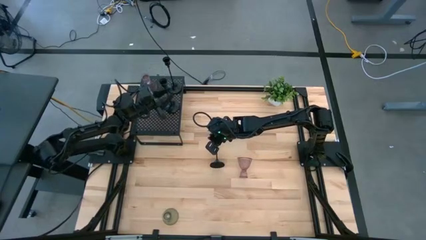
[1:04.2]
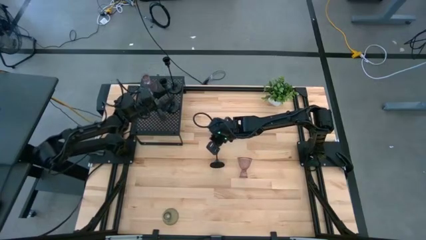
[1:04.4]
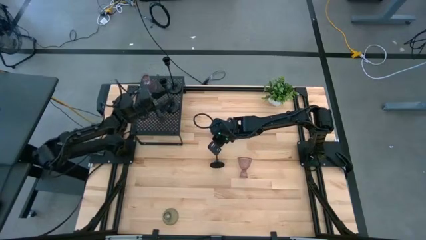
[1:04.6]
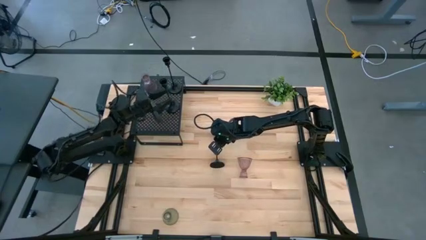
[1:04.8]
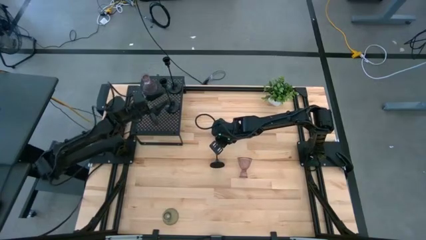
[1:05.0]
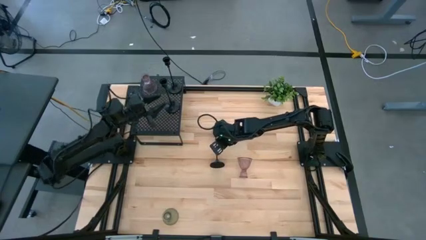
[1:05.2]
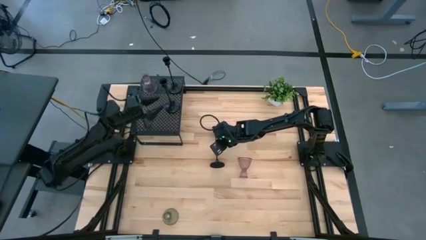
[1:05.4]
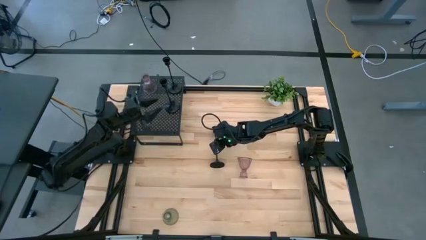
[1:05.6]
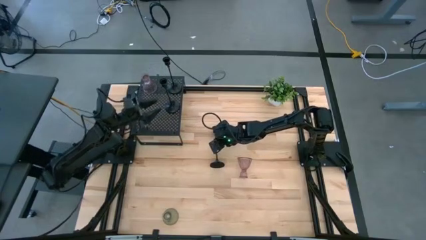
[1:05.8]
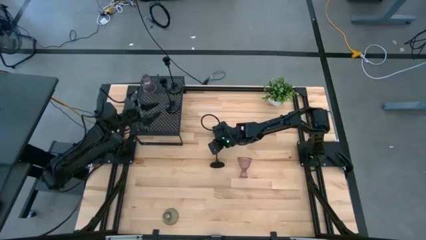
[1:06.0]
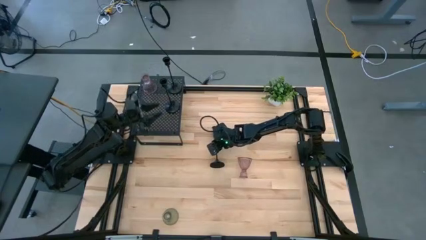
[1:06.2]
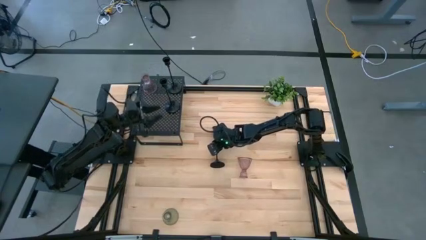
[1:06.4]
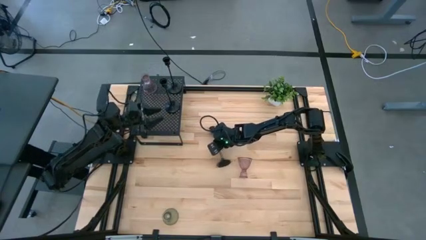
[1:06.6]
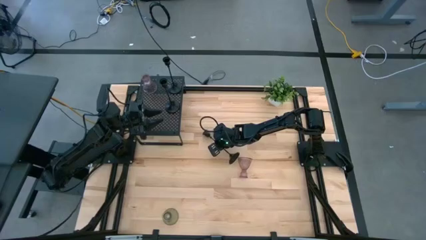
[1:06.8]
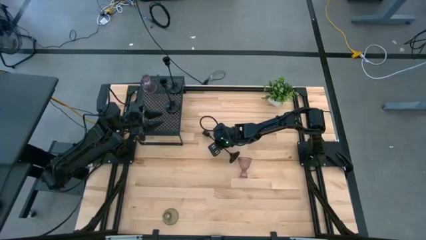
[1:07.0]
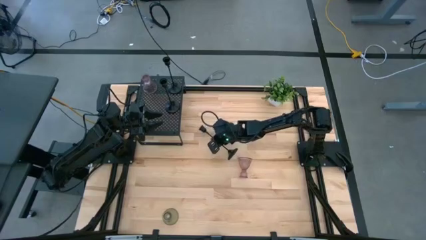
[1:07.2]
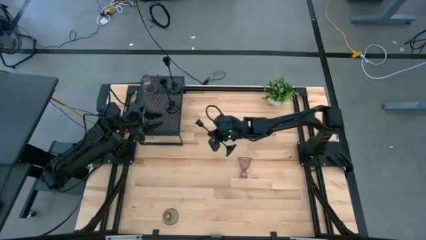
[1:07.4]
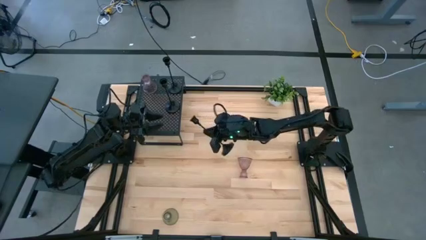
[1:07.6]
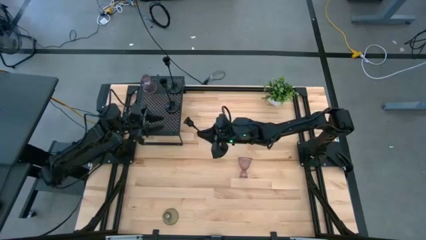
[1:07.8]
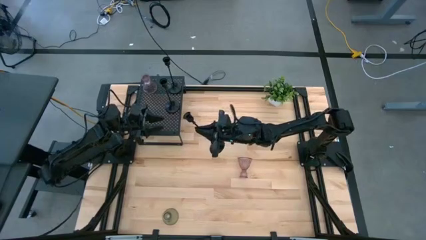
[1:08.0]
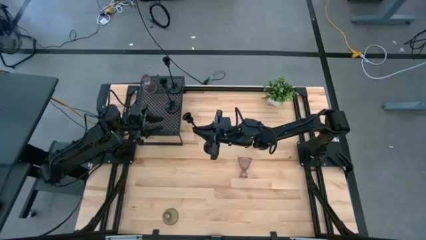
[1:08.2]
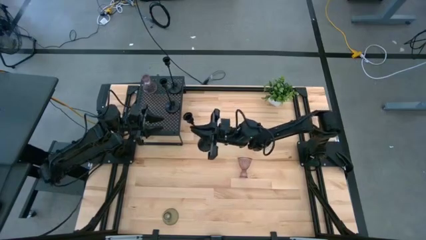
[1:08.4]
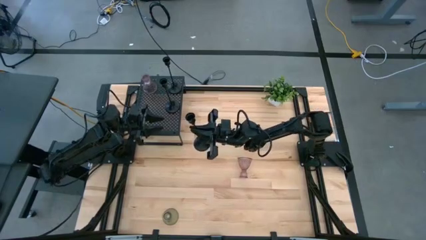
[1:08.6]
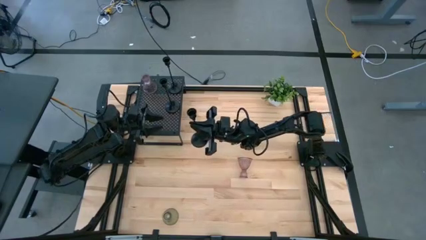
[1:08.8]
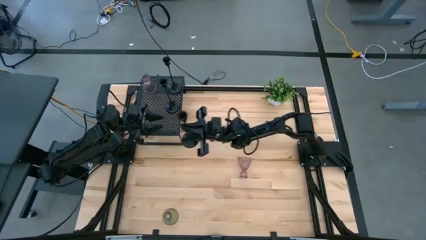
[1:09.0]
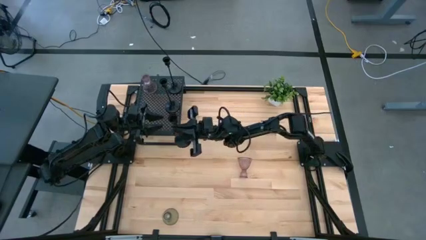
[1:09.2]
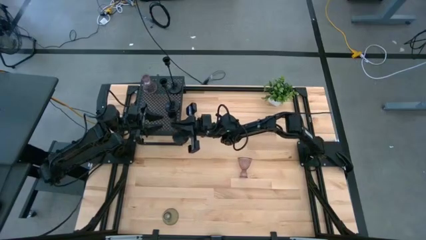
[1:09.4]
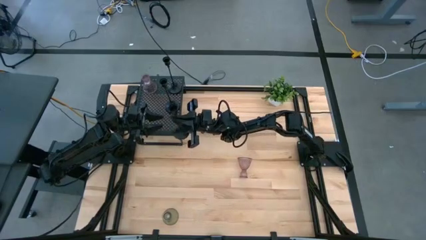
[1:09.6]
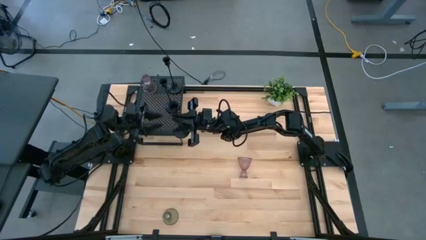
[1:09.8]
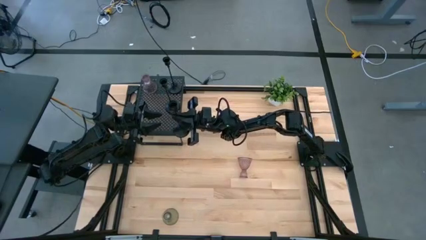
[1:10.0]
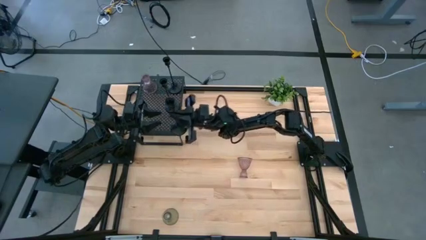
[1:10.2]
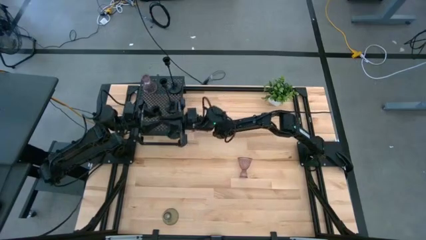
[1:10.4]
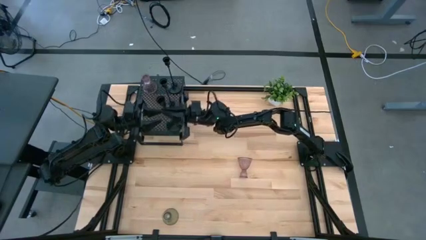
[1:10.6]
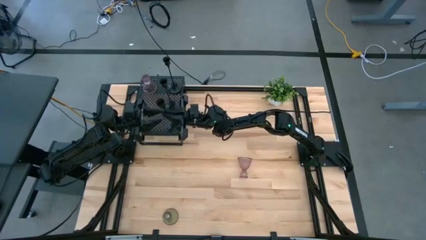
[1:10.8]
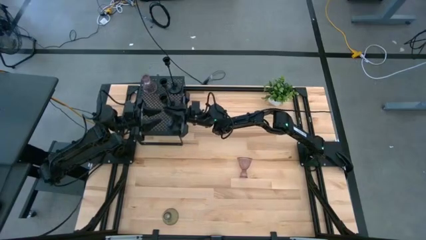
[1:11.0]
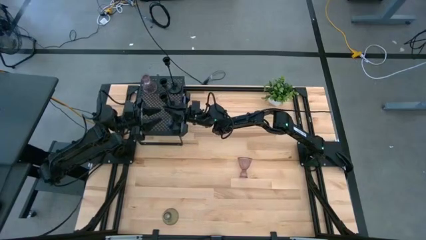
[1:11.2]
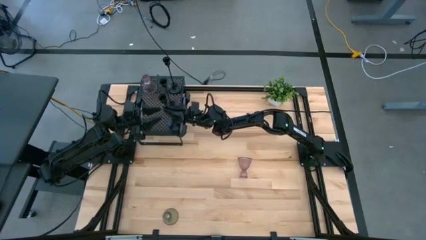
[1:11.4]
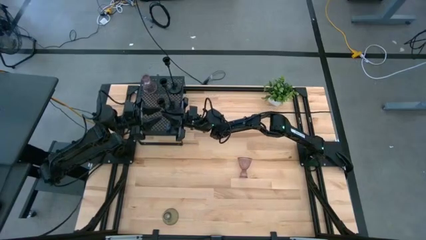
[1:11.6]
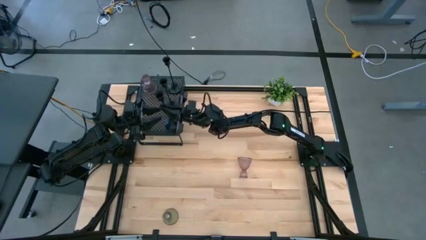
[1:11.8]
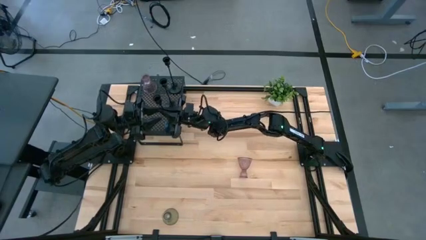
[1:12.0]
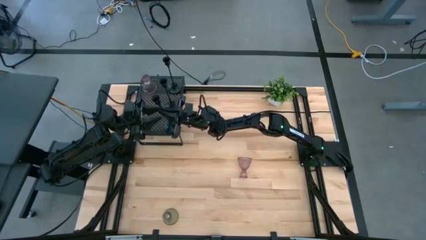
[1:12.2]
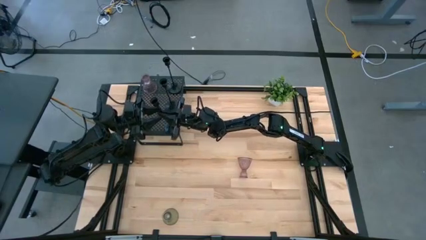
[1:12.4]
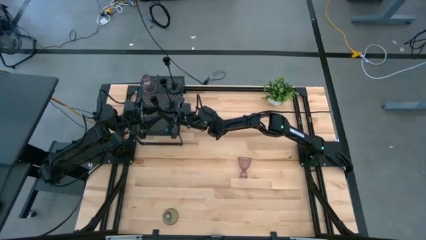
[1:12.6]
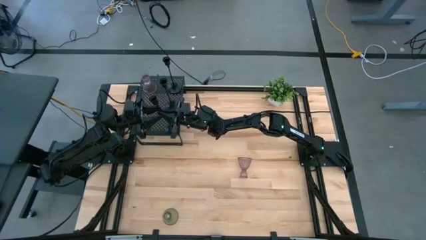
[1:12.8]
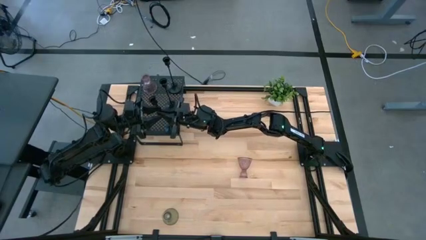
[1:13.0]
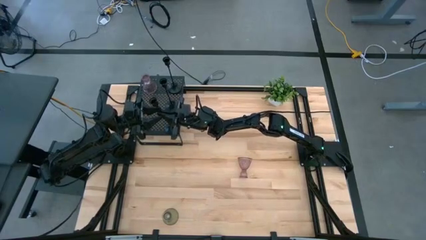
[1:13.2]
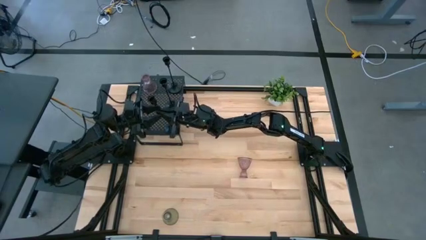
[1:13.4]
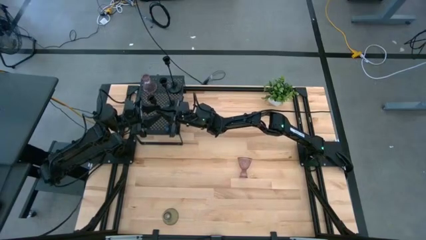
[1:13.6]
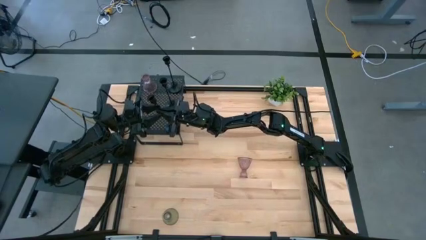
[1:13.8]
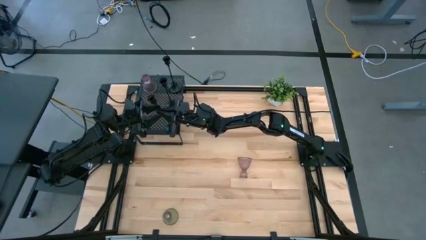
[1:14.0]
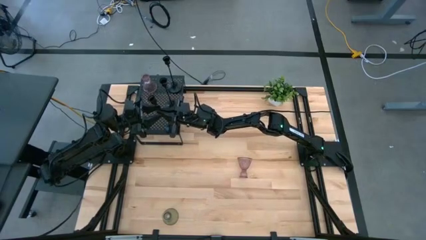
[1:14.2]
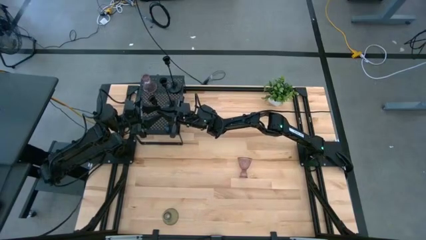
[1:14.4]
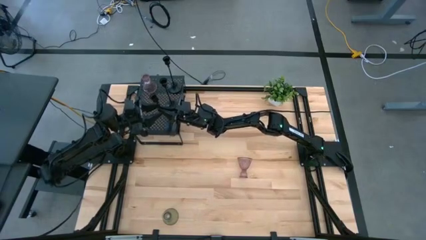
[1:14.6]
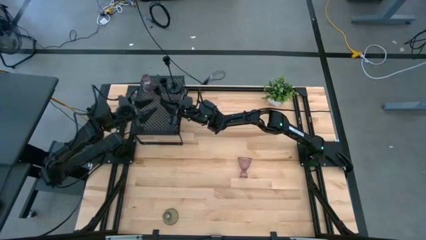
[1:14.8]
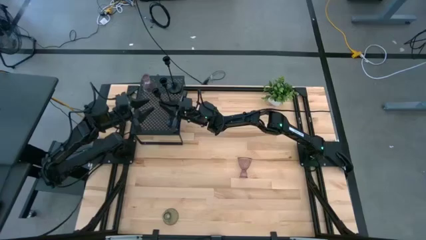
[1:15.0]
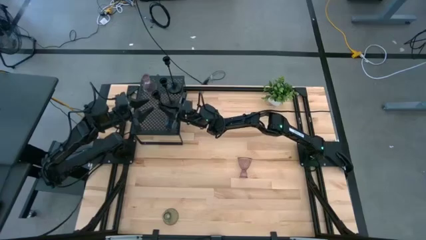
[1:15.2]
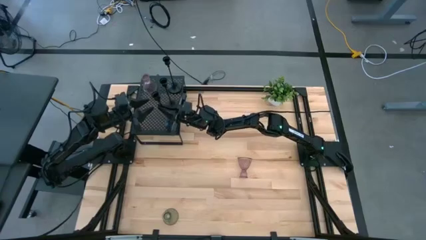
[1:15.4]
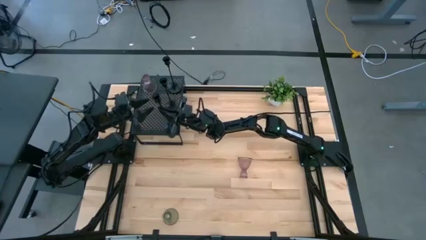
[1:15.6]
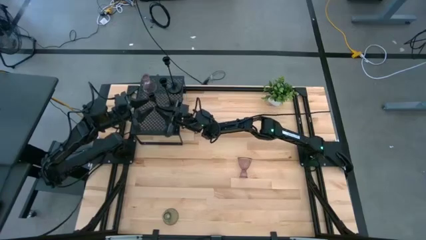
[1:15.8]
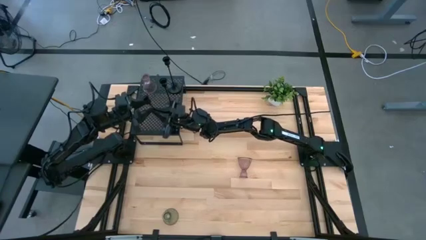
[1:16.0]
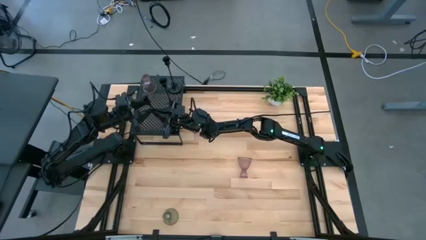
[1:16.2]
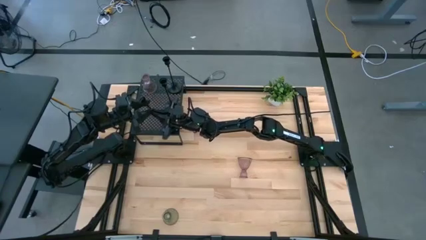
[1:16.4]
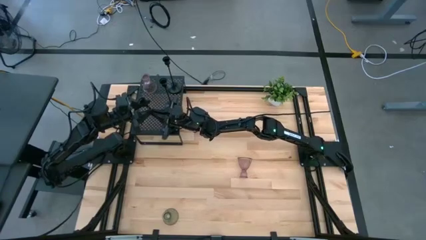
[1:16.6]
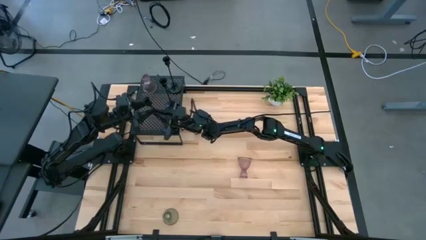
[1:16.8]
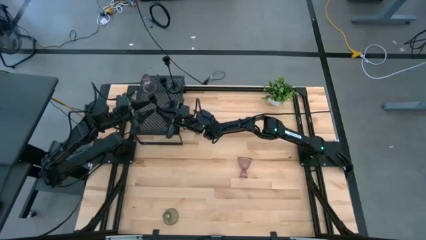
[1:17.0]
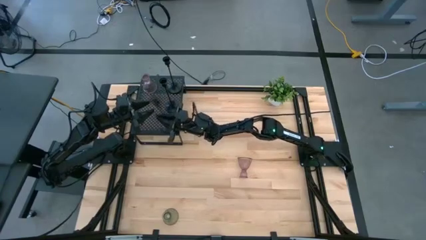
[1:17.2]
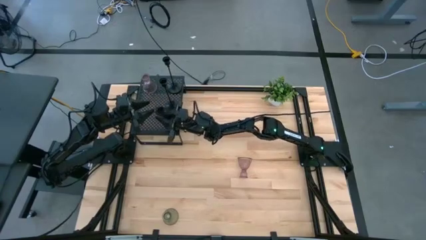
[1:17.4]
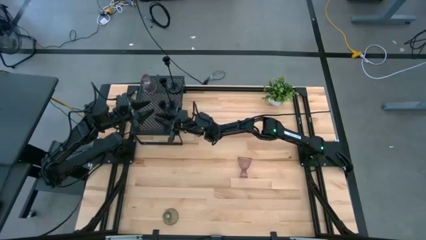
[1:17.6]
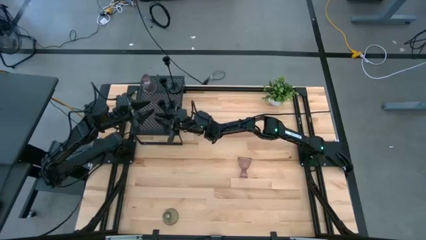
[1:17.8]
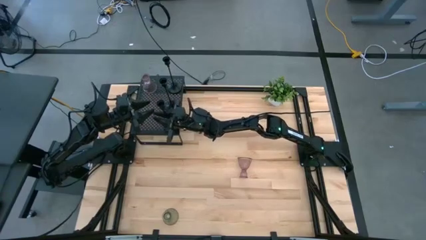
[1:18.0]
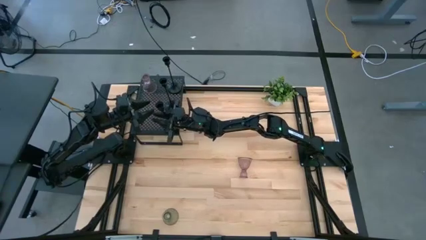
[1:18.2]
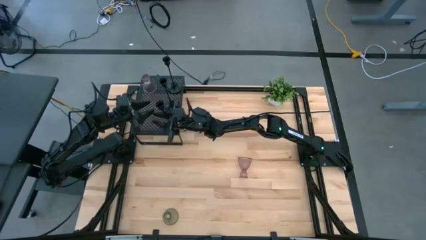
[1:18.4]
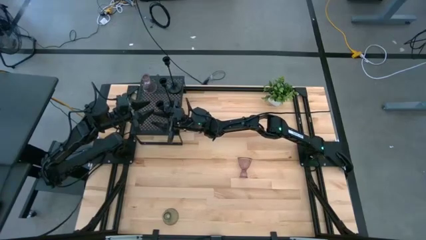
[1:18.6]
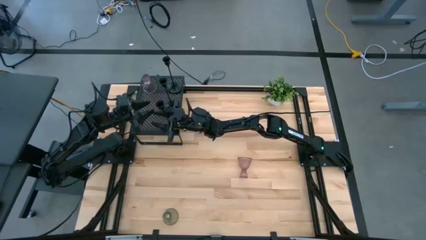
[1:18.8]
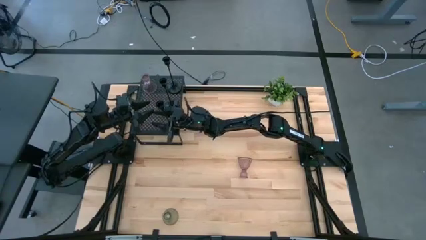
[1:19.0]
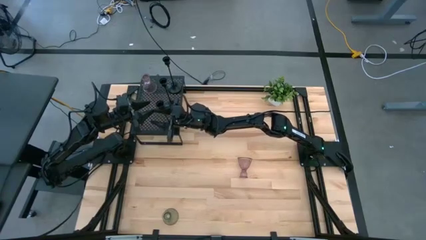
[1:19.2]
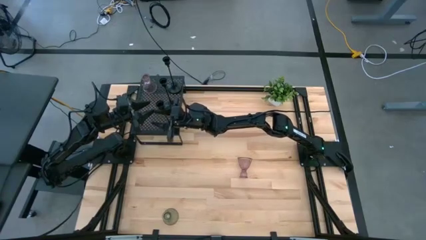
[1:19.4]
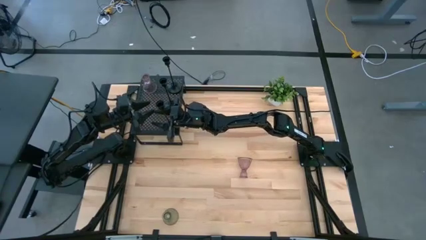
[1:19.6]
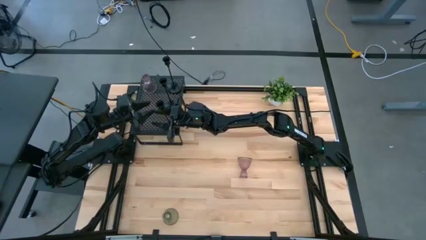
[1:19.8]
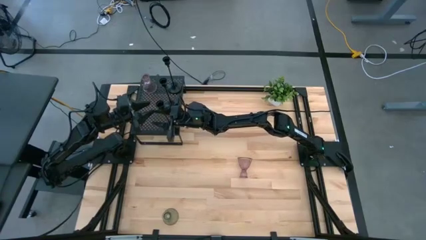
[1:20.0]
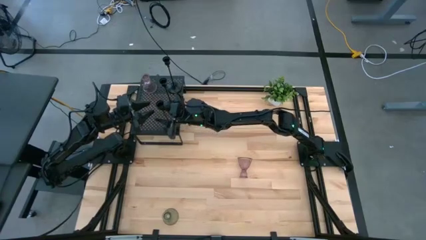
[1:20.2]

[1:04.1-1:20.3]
Task: Pick & Place candle stick holders
Align the right black candle holder with the other black candle holder on the shelf

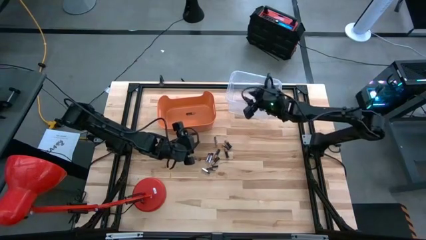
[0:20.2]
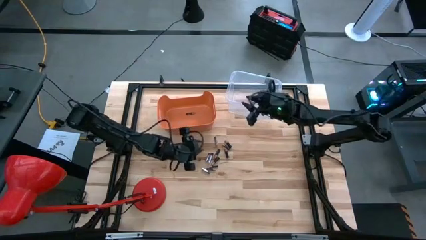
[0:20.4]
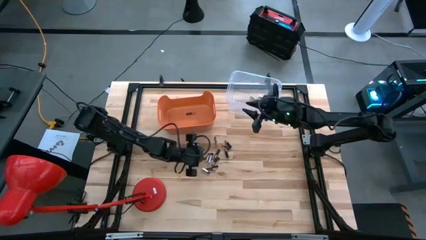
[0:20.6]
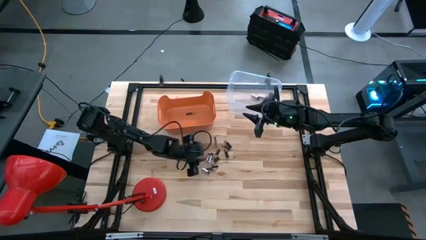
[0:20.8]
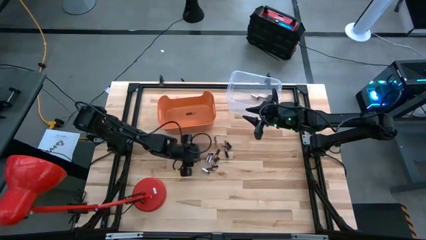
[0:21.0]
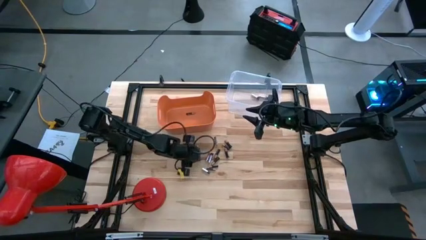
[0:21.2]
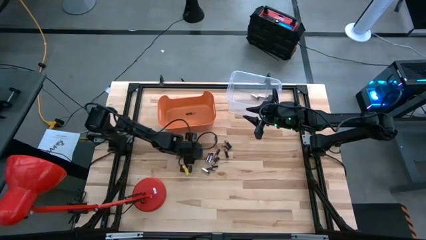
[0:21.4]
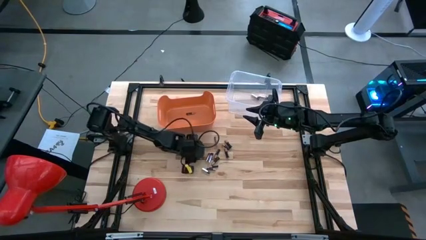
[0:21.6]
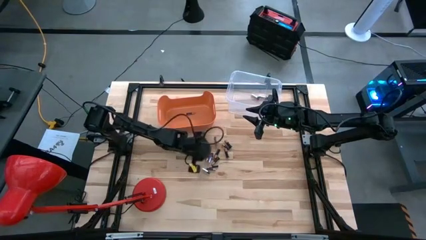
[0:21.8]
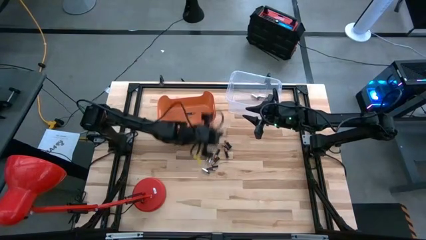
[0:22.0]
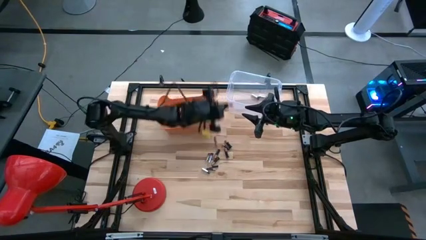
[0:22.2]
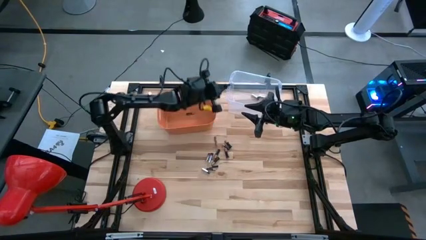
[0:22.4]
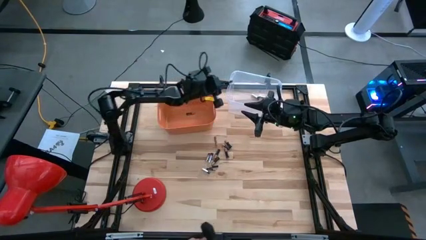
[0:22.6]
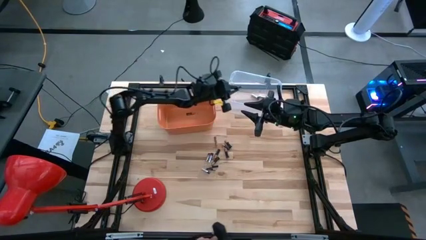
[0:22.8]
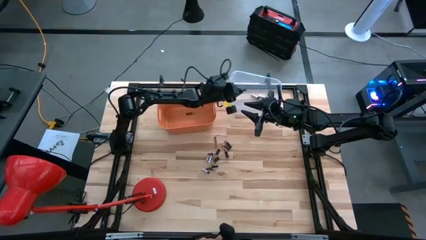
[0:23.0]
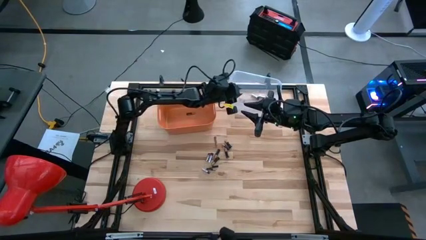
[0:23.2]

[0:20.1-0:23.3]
Task: Sort batteries
Put the silver battery into the transparent bin
